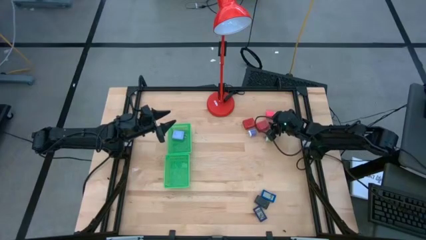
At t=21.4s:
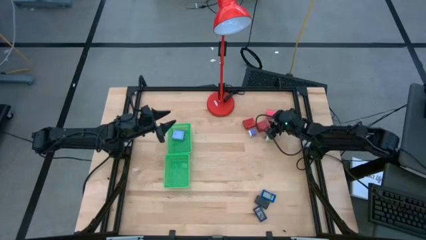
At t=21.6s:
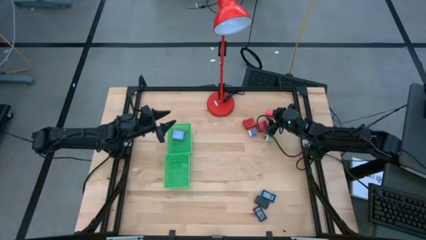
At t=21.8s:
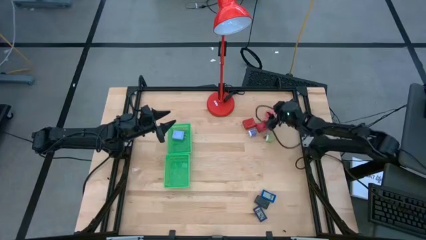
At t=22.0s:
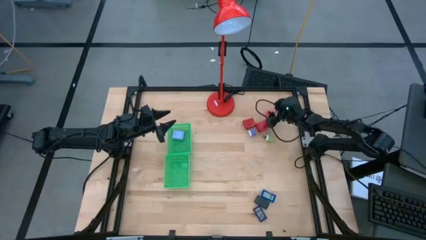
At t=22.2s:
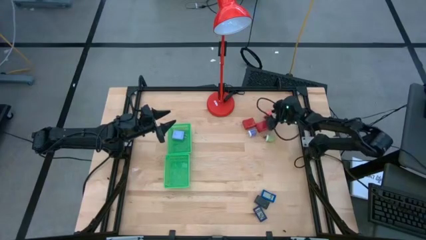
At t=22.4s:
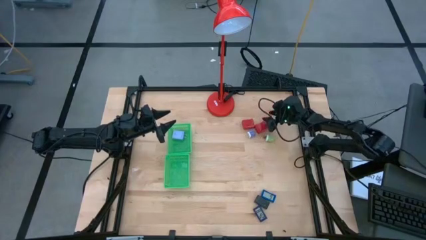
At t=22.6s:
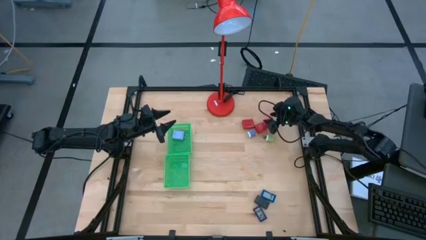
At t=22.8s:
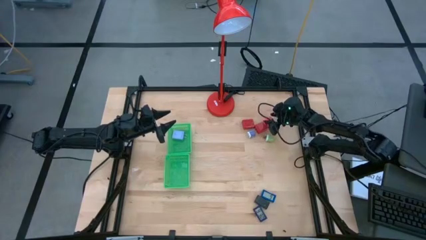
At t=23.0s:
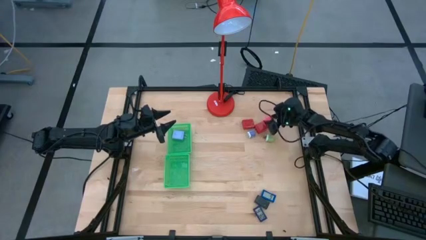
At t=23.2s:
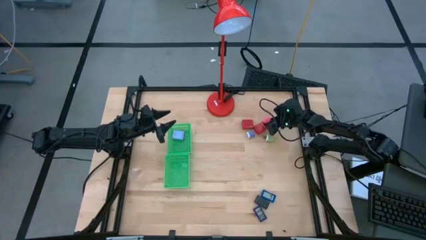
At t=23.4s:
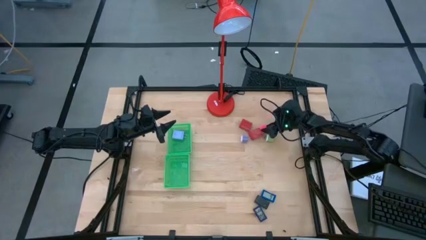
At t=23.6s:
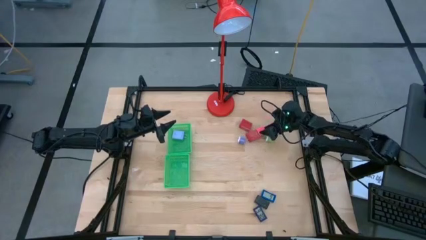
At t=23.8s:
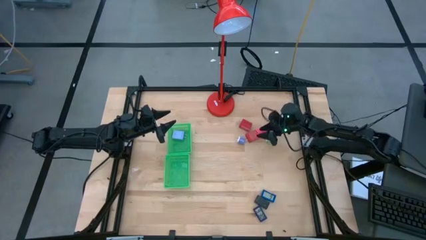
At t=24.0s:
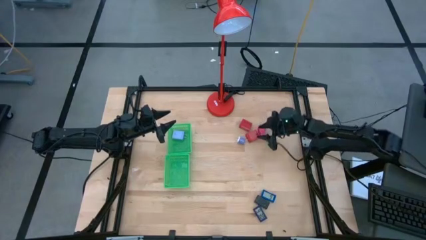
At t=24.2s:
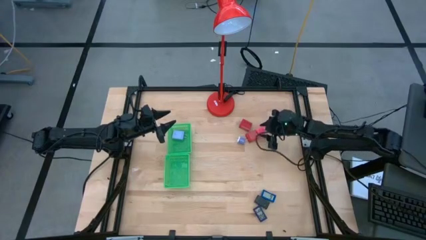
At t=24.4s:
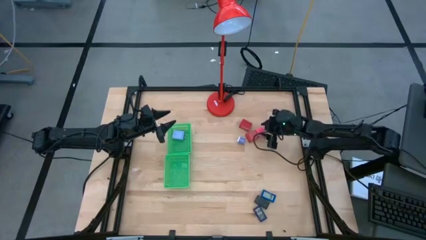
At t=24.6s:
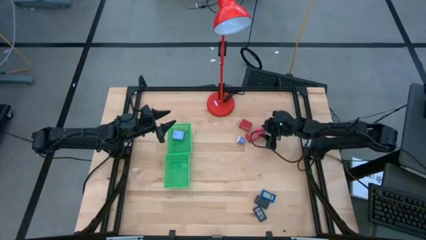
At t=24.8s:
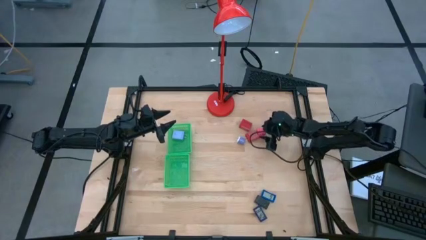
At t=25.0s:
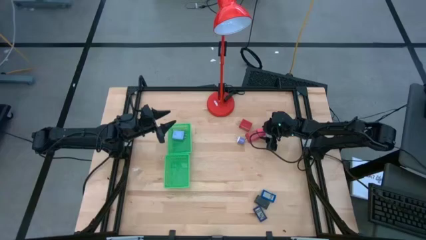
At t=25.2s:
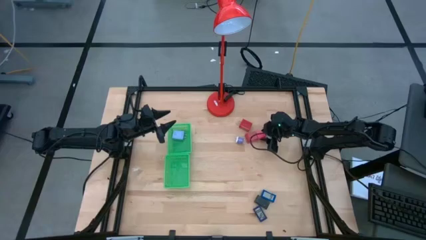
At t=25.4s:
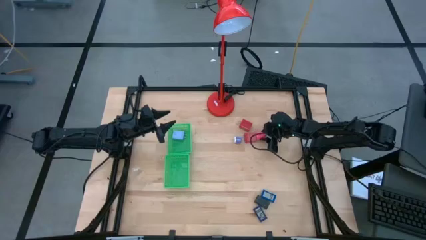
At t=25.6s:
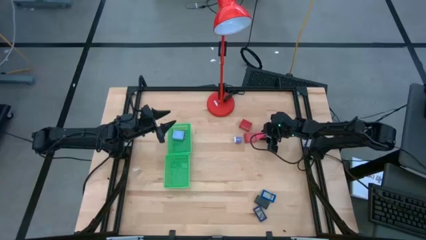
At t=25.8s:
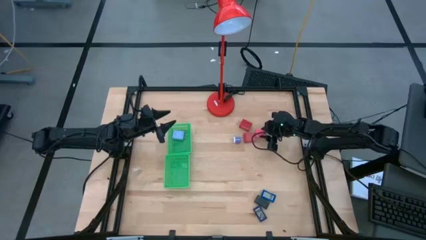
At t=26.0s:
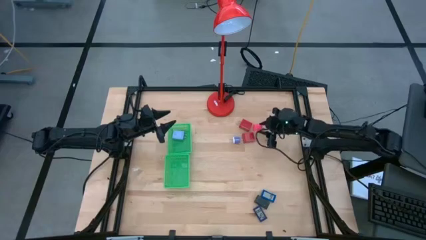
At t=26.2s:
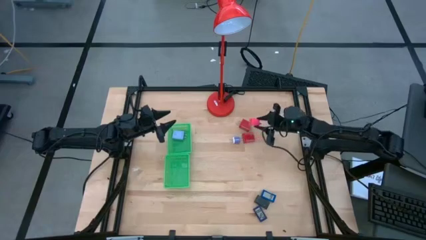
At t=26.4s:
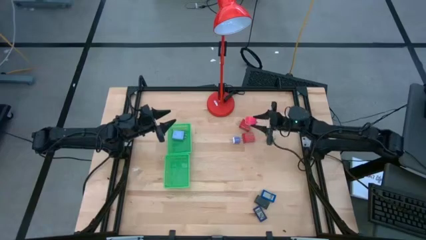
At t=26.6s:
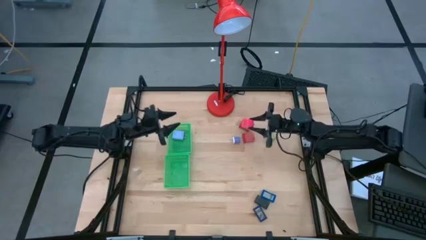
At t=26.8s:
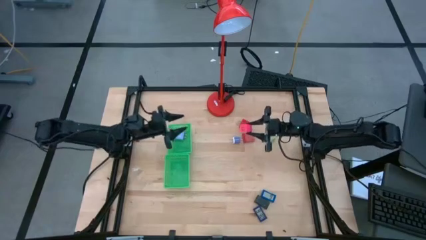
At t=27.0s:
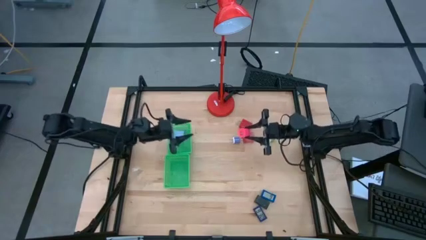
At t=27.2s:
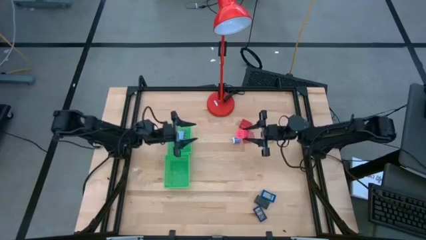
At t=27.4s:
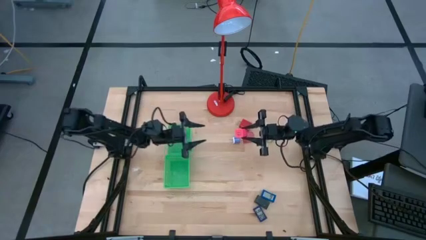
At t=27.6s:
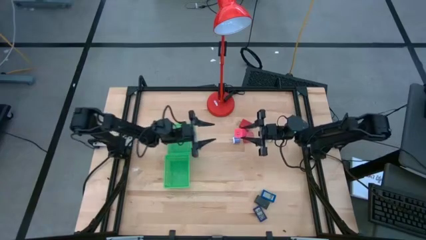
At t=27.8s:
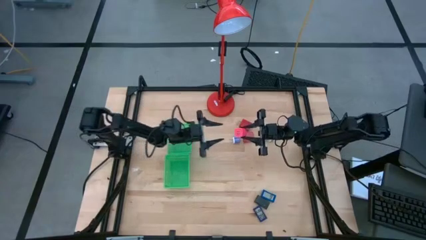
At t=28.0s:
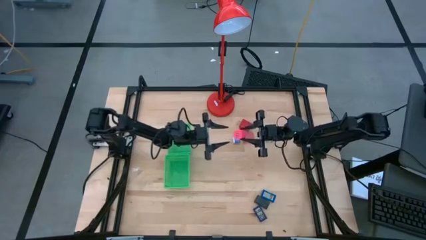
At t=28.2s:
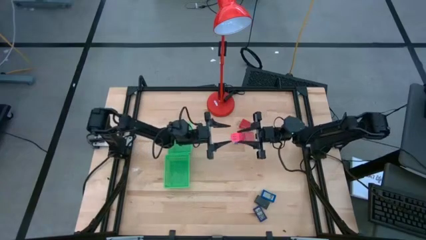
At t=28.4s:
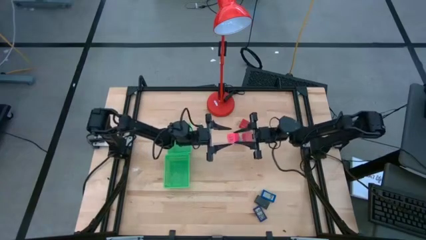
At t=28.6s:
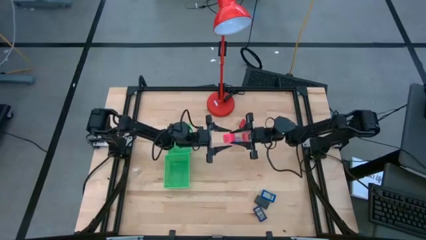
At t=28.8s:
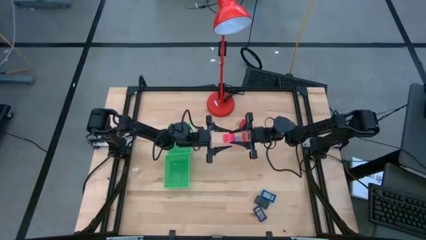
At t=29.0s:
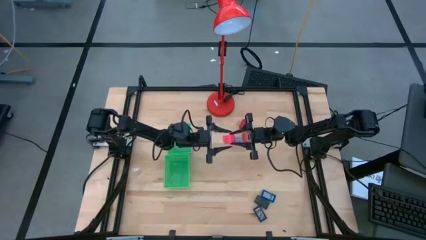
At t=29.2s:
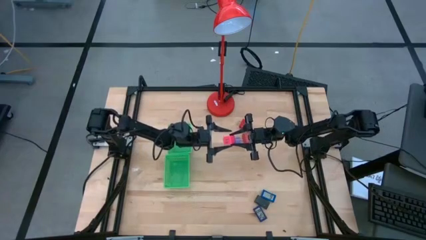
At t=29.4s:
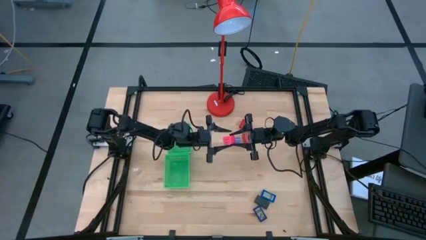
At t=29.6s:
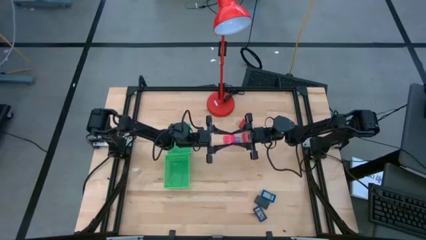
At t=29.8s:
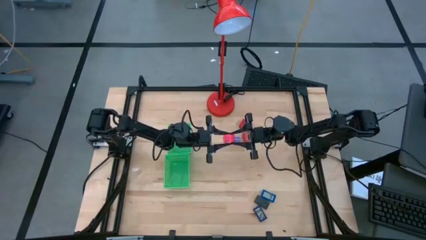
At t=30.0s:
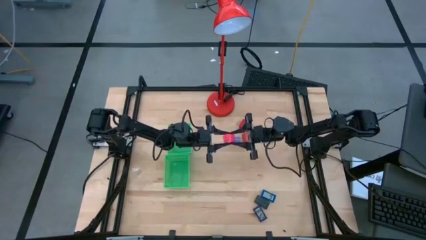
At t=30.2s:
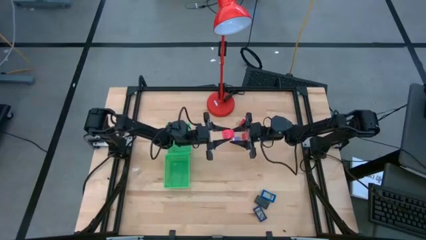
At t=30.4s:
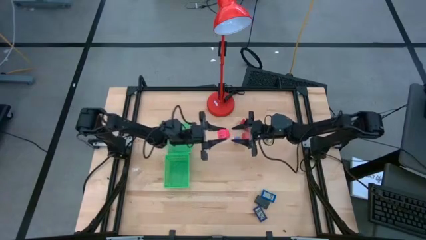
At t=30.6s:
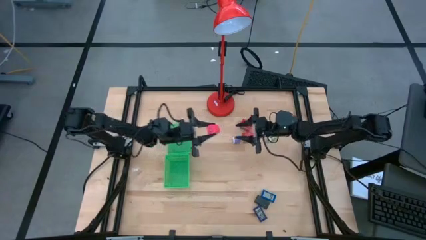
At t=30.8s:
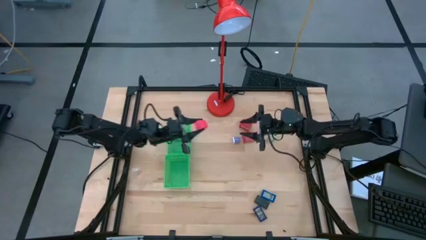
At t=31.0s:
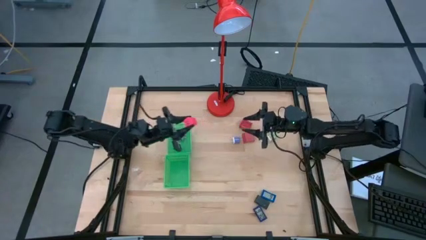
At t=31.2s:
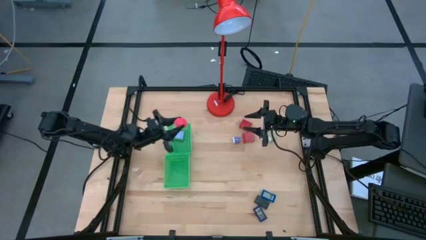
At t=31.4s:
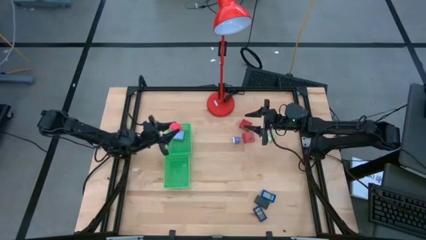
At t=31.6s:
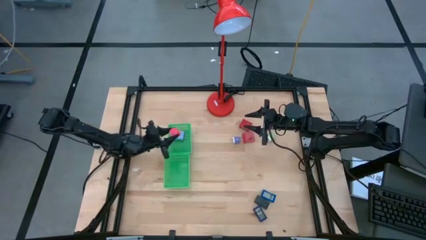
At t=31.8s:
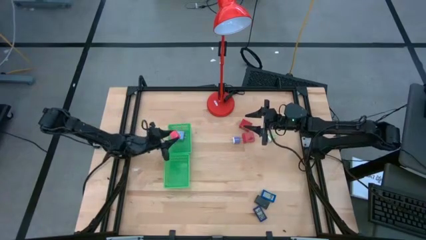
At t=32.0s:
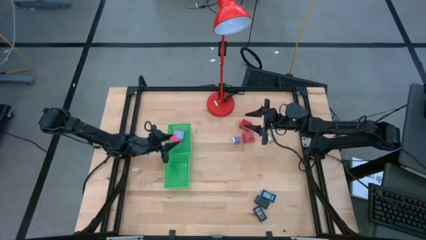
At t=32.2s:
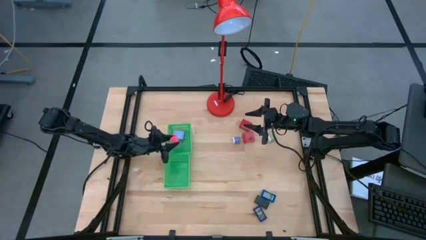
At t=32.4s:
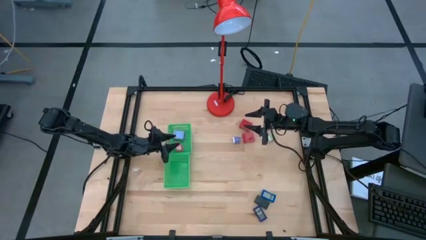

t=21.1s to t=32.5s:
Task: Pick & Place Office items
Put the pink charger adapter into the top green bin

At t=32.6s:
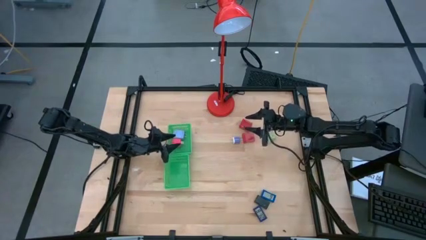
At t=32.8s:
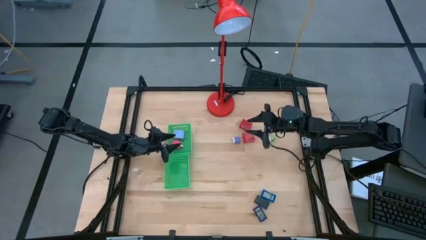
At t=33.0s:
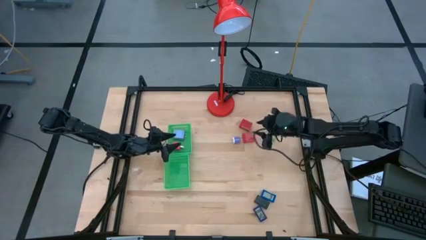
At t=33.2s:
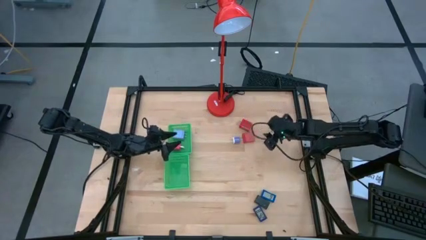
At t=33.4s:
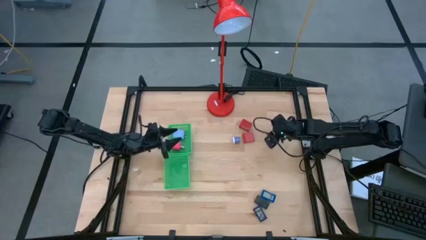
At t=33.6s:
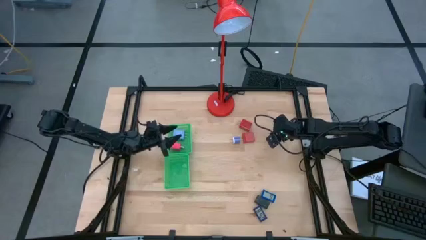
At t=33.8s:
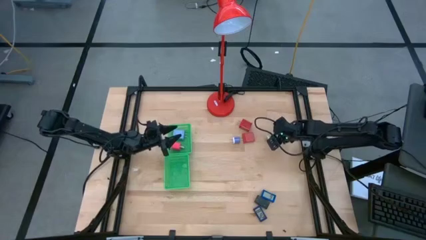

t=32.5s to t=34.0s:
Put the green charger adapter into the top green bin
